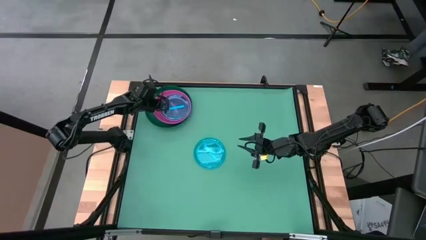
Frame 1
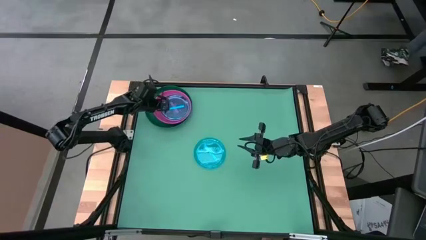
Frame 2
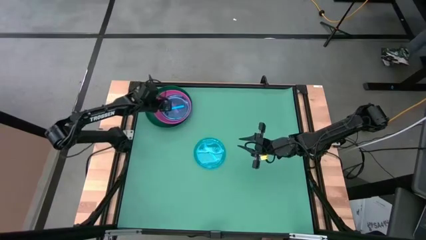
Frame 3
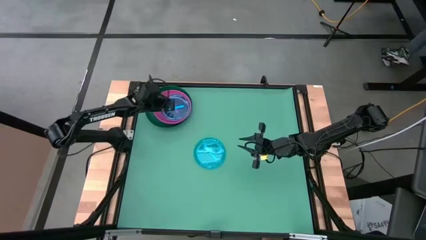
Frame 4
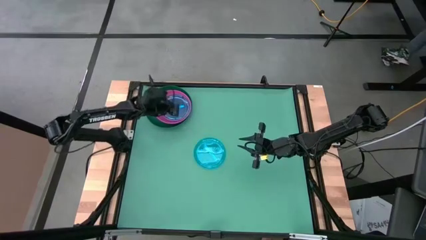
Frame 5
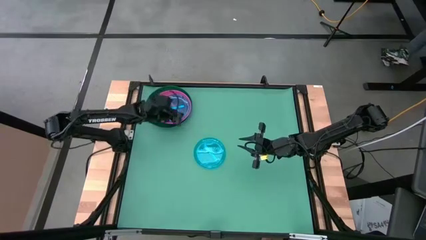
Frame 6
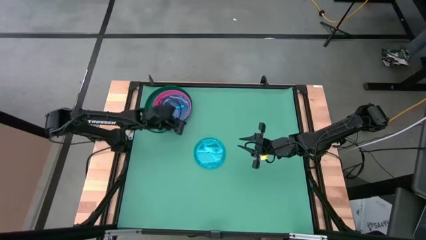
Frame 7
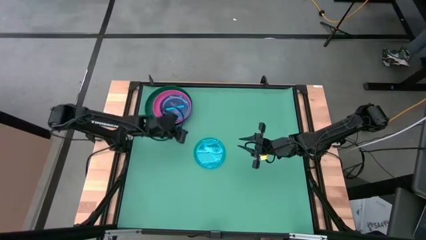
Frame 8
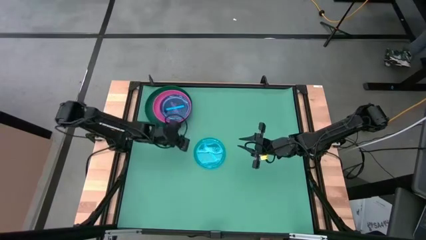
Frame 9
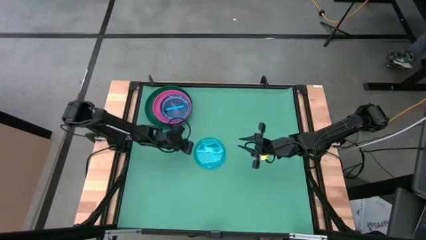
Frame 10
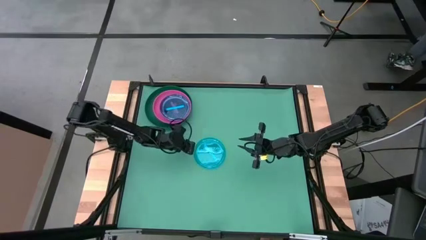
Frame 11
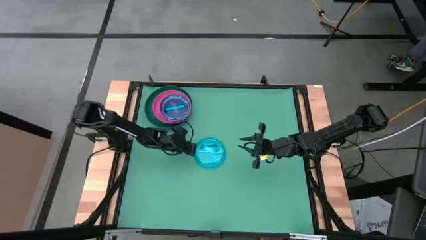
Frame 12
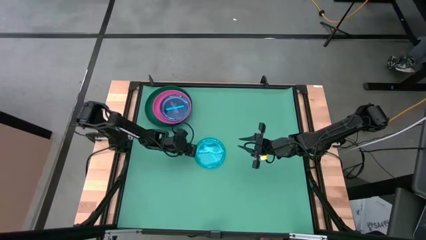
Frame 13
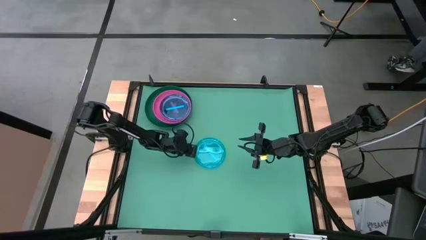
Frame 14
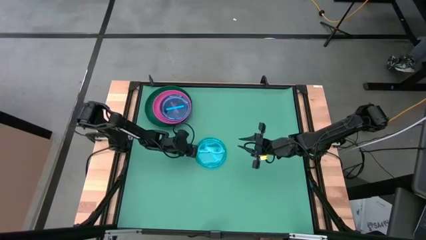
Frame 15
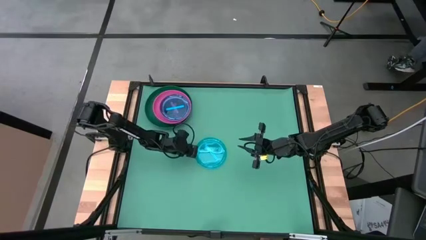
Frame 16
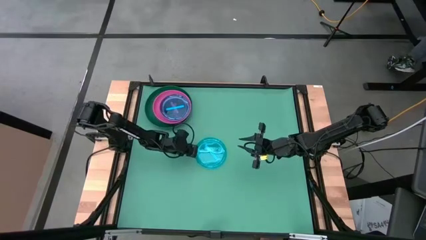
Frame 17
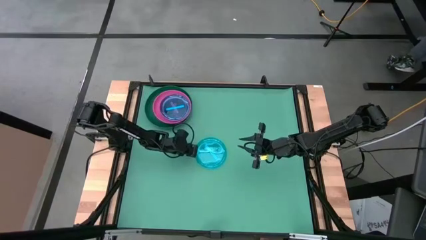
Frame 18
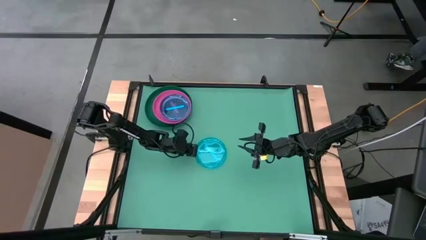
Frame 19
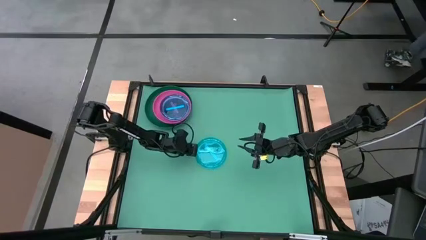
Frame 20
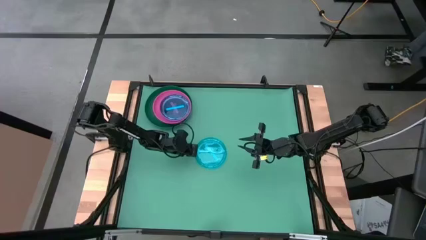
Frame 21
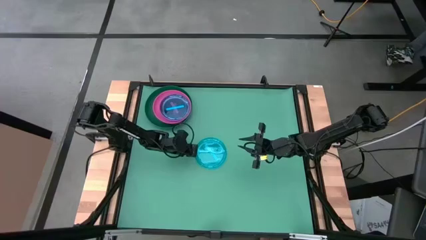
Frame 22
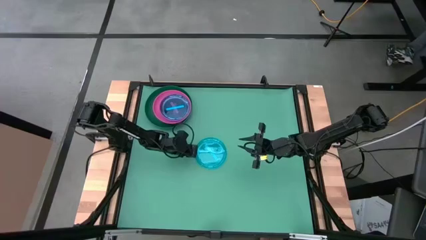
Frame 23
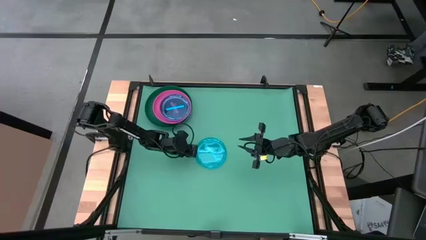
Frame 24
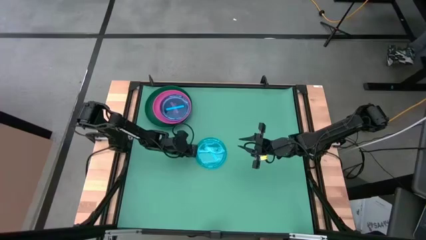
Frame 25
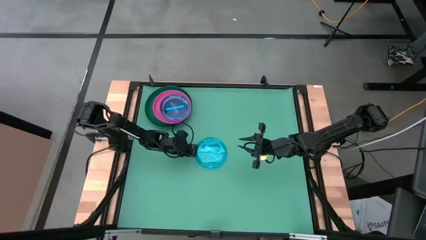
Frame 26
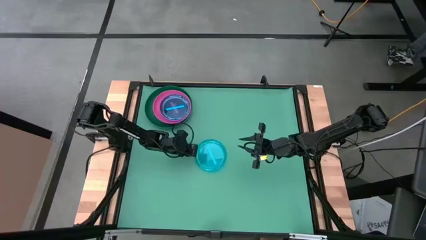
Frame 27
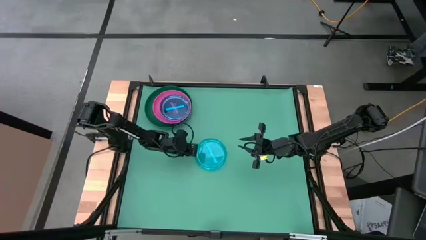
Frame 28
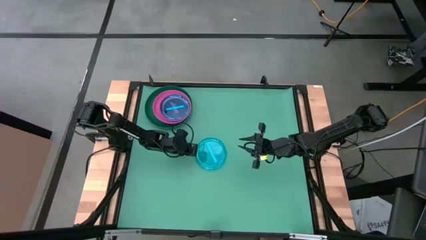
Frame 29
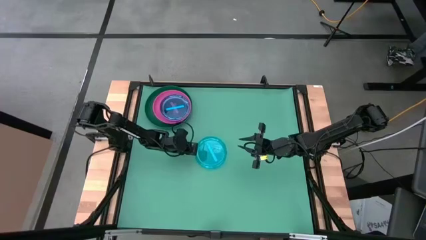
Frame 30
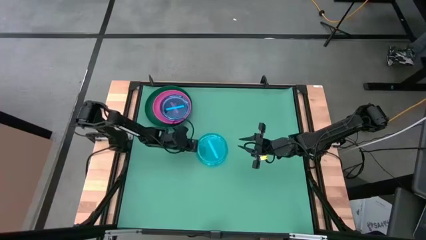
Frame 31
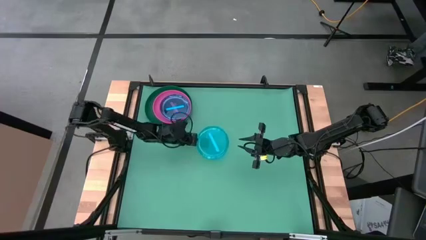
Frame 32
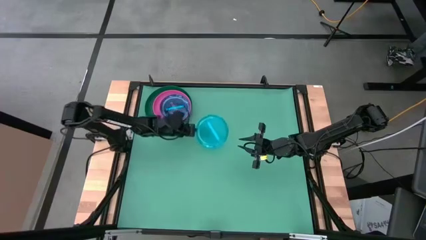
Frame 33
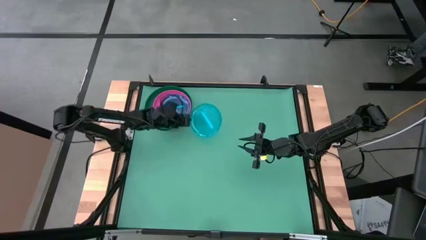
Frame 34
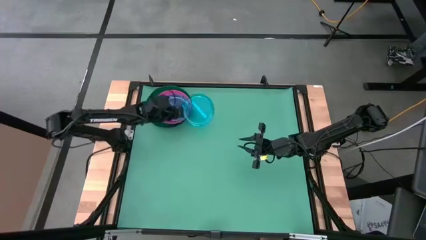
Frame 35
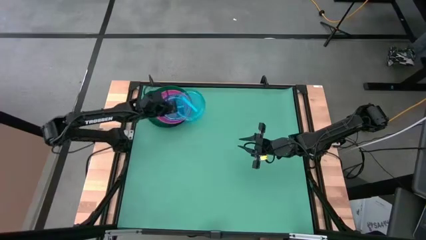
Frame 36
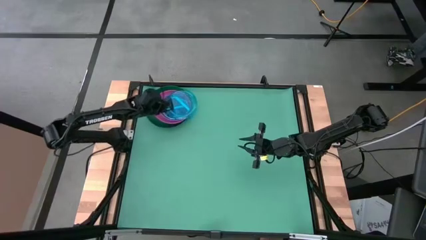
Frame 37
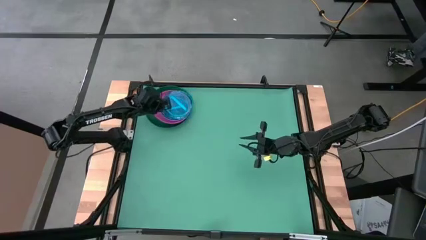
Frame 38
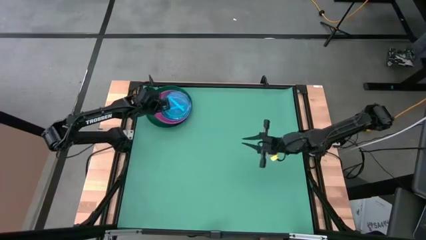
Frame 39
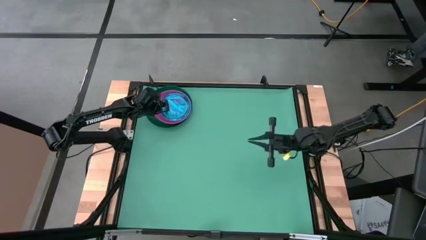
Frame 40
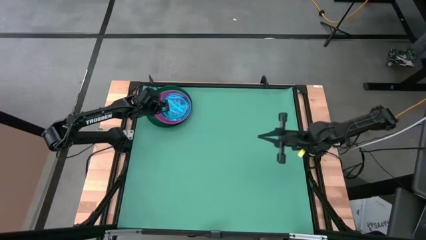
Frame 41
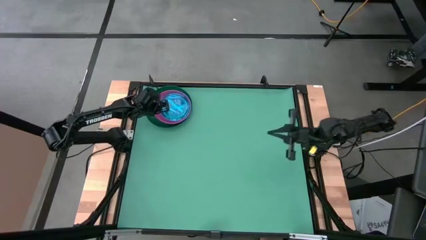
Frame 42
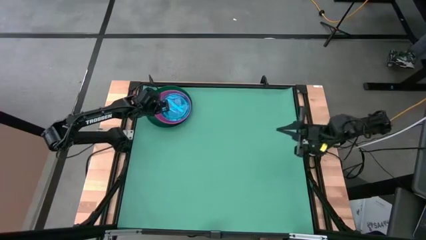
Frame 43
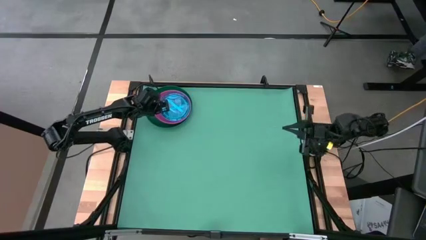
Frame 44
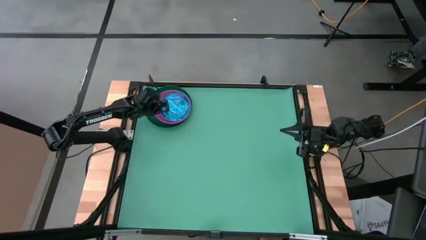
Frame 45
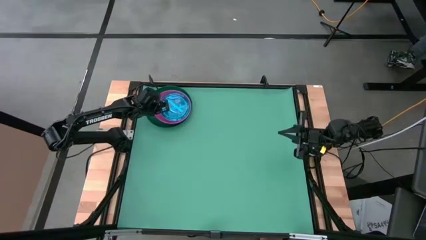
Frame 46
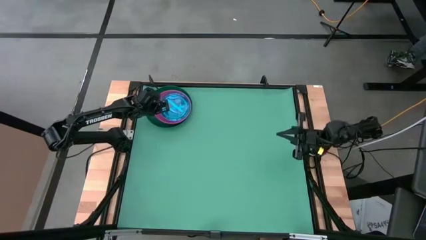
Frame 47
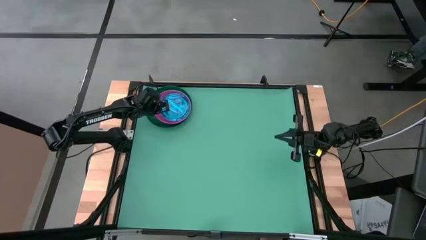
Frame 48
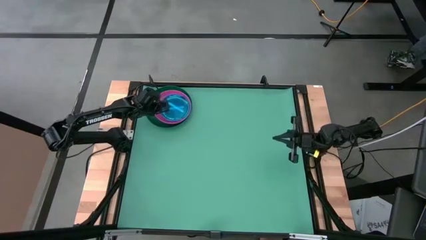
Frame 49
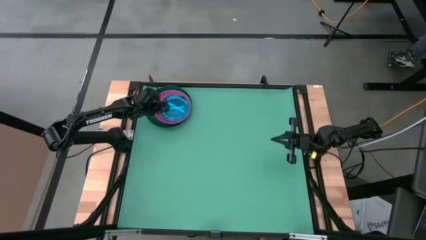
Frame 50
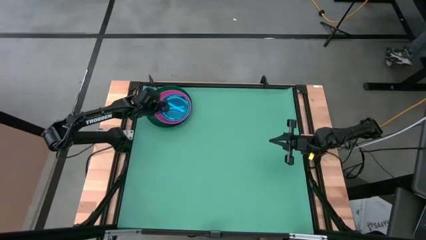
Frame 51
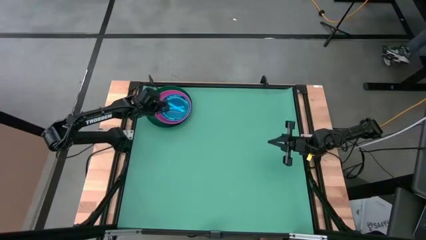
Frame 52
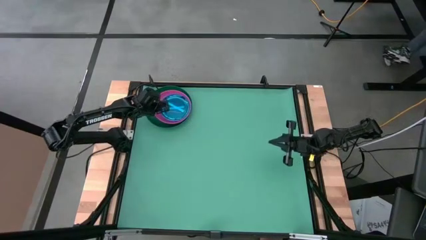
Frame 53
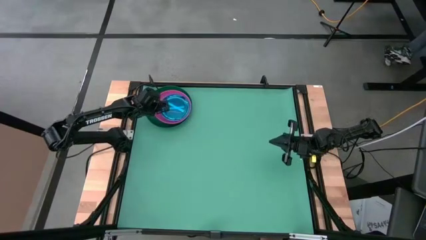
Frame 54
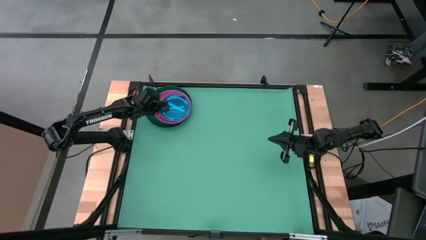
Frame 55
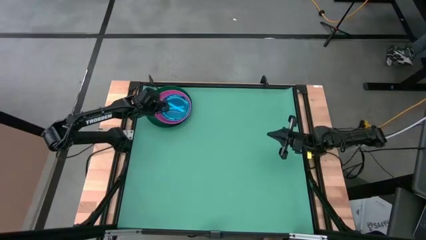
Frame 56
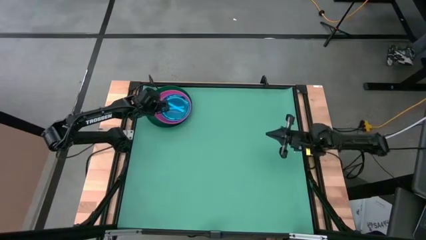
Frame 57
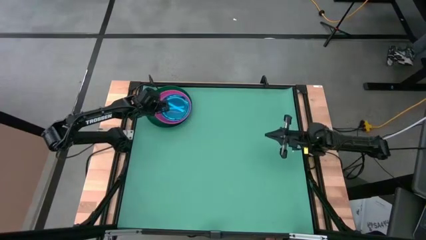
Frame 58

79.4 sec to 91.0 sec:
Task: Stack plastic plates
Stack the blue plate on top of the blue plate

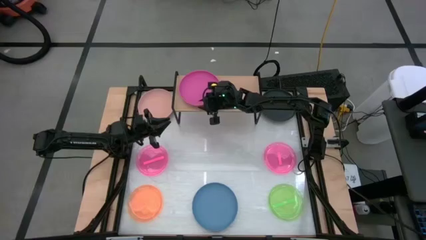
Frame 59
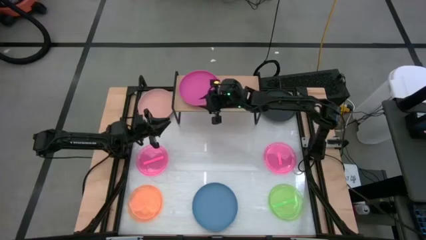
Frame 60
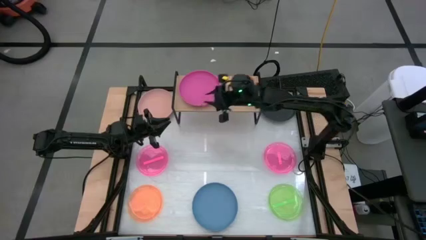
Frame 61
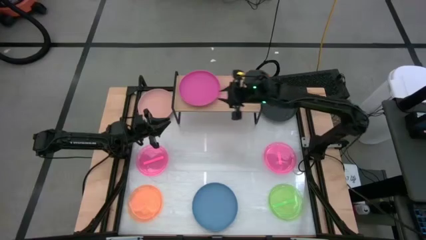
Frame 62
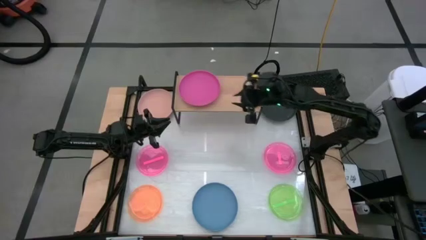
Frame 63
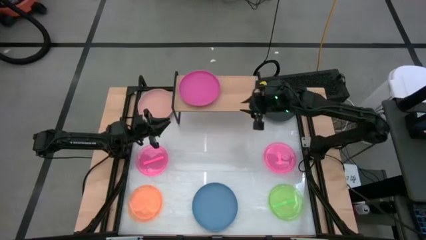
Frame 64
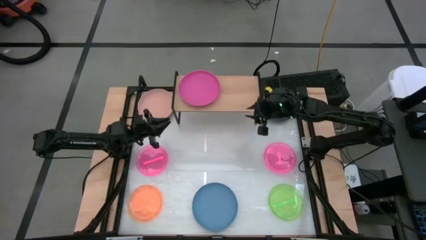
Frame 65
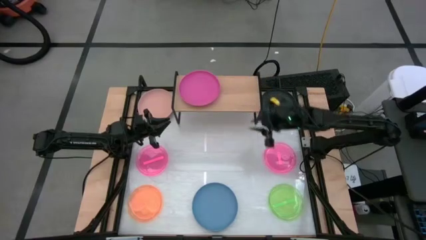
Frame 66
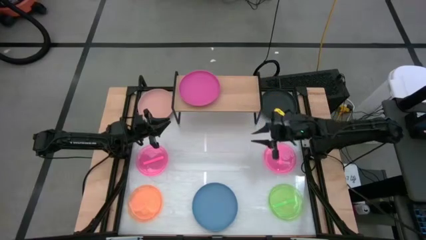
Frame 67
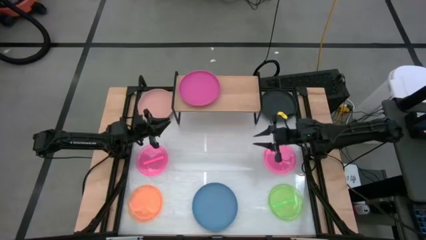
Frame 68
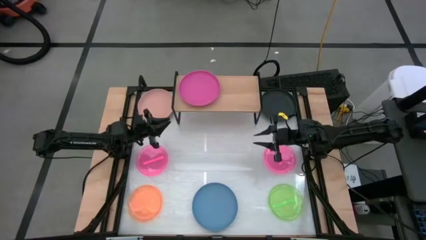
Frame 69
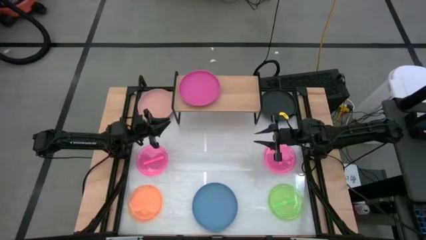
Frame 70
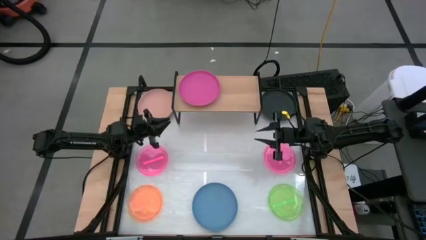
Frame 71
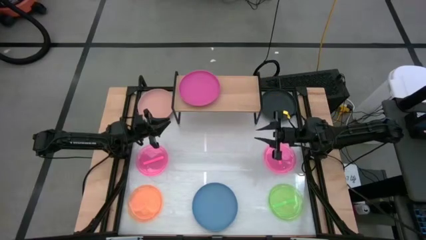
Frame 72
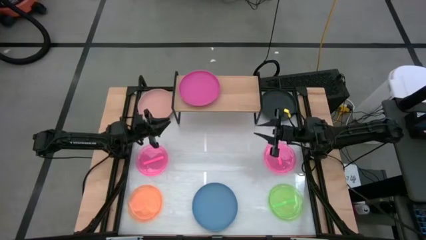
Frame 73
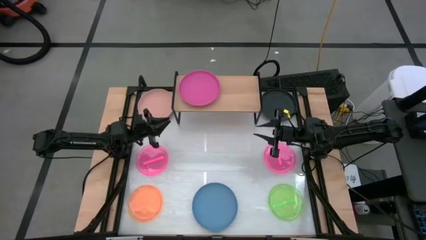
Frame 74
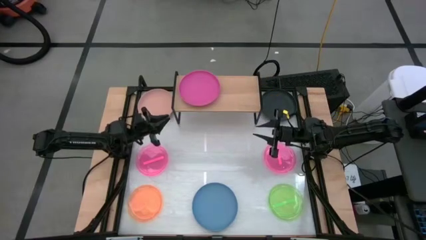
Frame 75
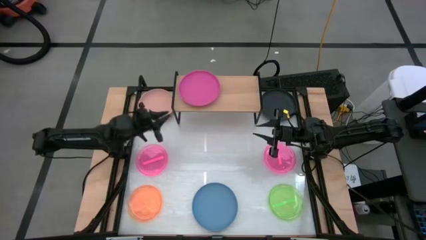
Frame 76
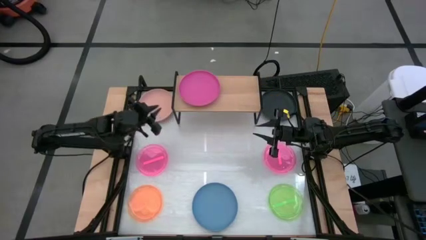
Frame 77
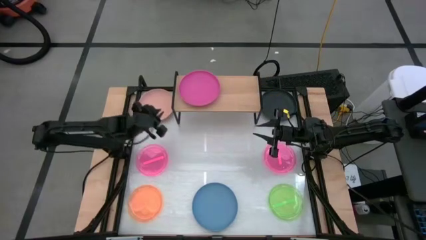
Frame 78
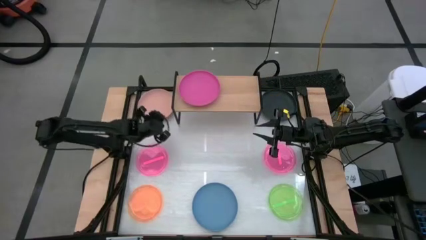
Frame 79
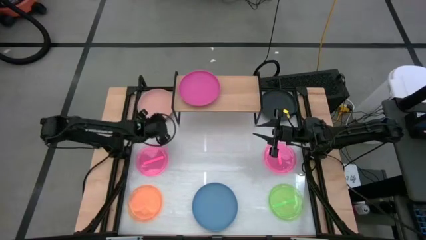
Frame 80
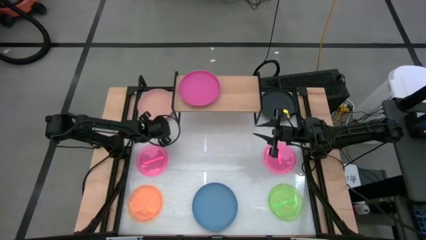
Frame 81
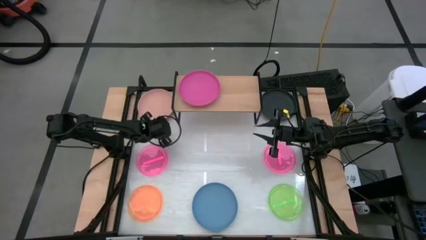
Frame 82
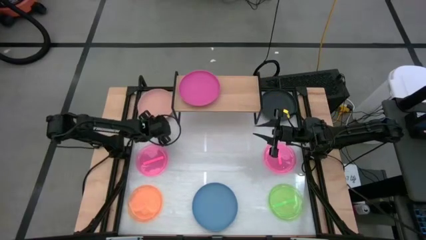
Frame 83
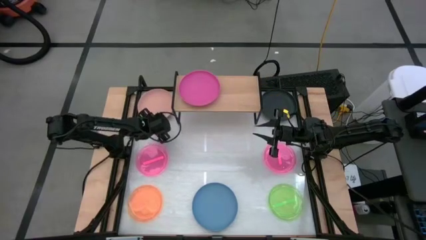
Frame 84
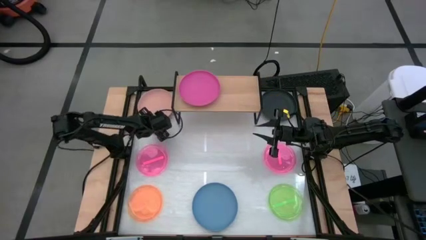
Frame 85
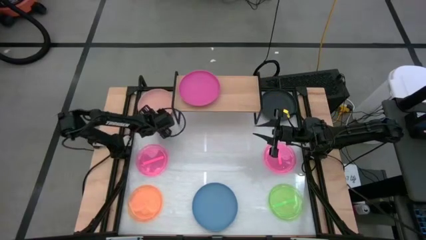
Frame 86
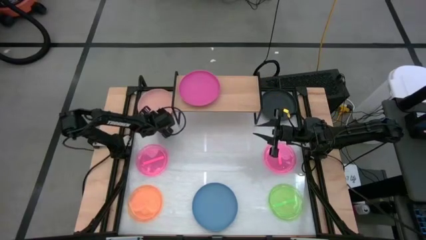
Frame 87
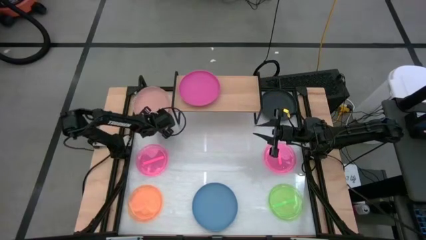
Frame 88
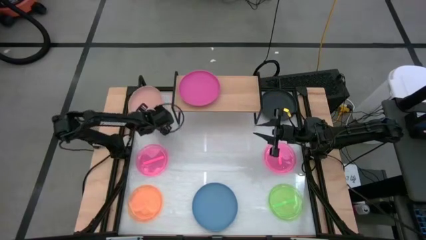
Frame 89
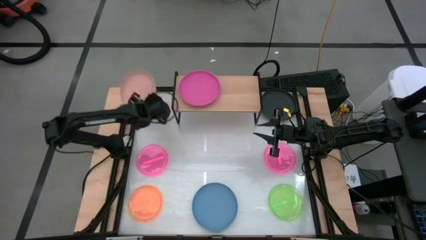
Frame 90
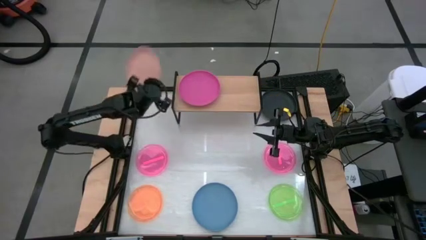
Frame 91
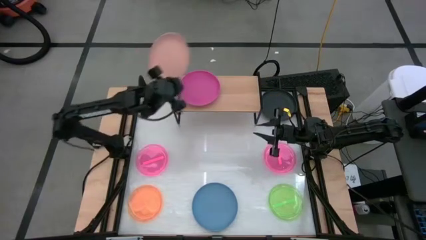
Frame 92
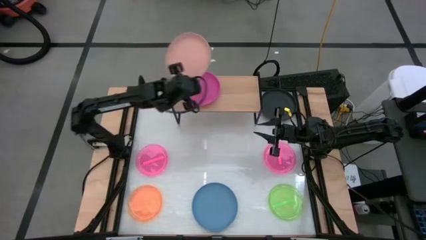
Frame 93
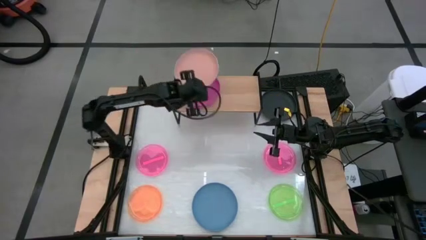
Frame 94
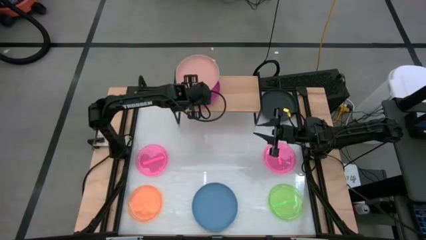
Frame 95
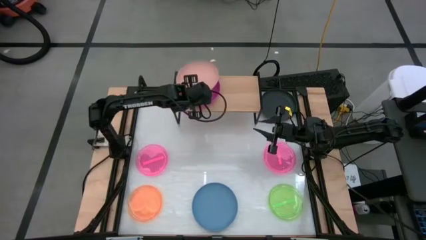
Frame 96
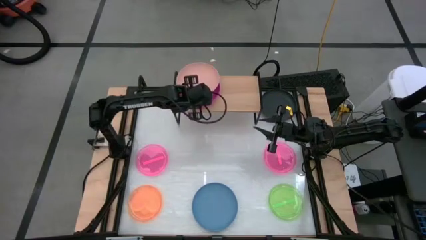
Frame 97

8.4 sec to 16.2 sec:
Task: Place and stack plates onto a shelf
Stack the brown plate on the large pink plate on the shelf
